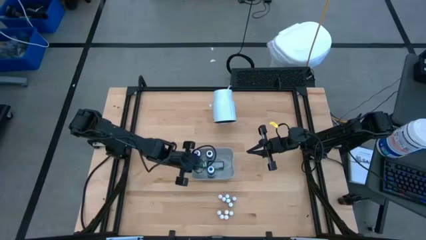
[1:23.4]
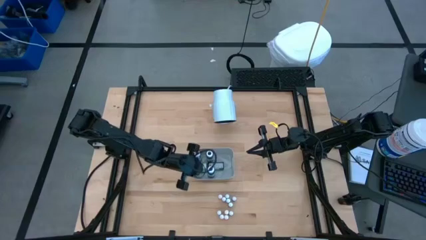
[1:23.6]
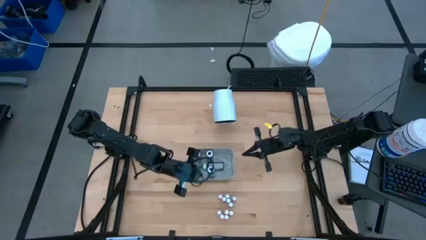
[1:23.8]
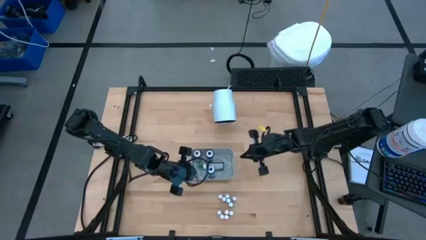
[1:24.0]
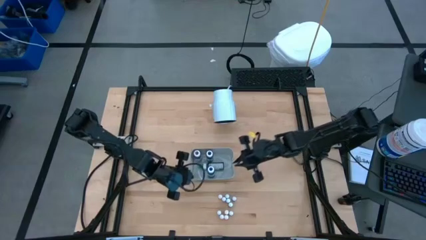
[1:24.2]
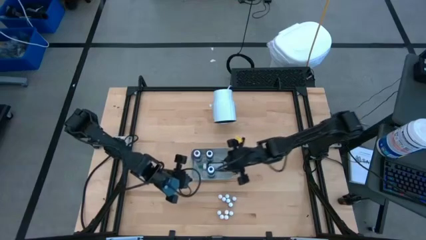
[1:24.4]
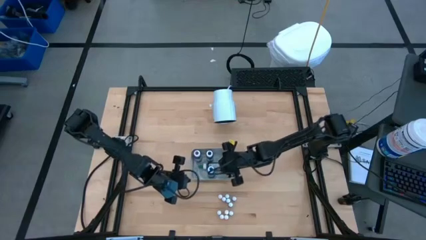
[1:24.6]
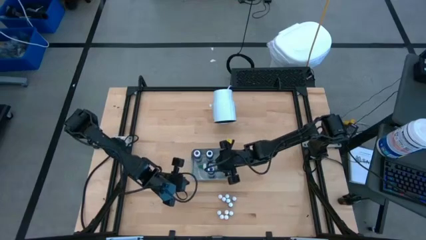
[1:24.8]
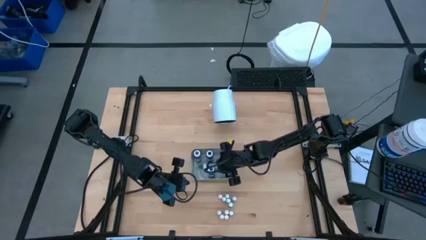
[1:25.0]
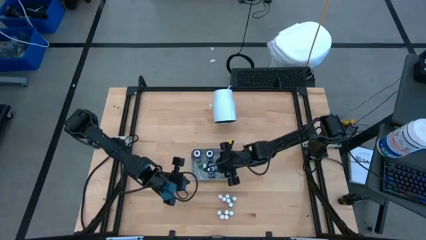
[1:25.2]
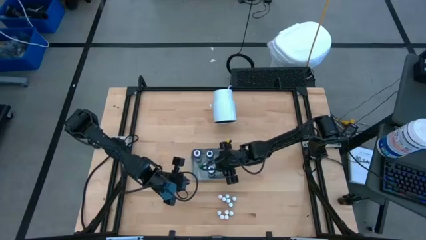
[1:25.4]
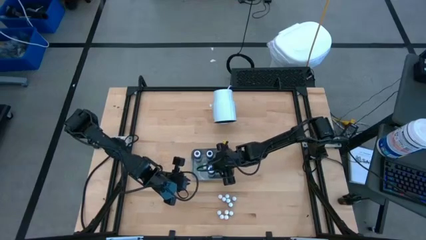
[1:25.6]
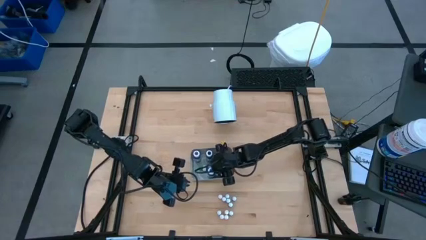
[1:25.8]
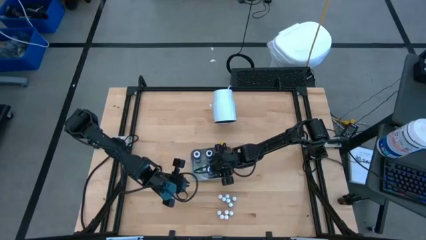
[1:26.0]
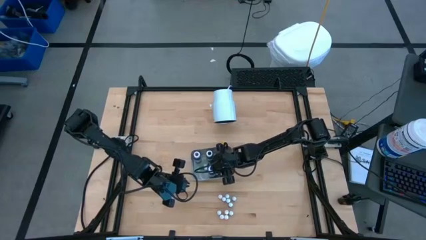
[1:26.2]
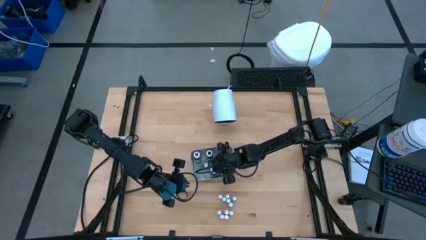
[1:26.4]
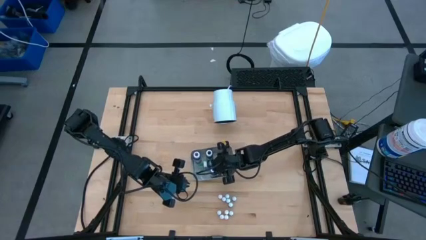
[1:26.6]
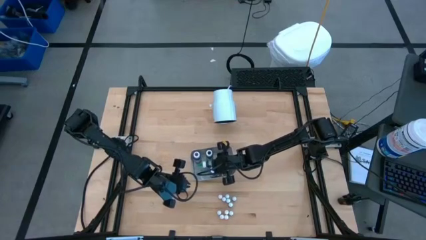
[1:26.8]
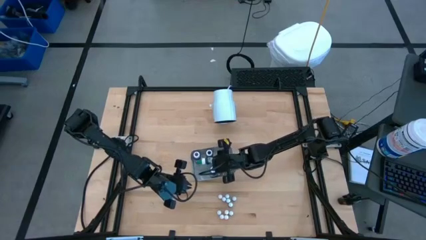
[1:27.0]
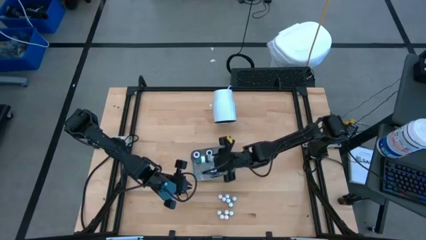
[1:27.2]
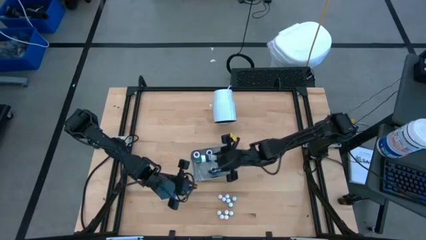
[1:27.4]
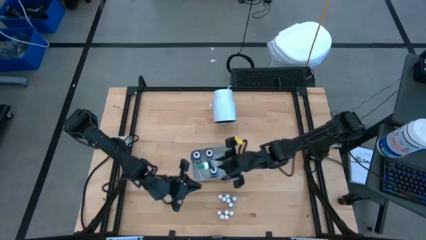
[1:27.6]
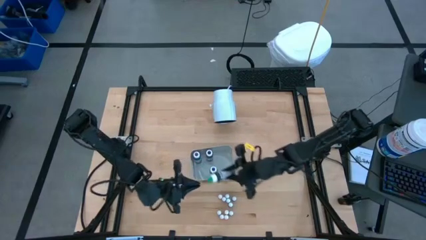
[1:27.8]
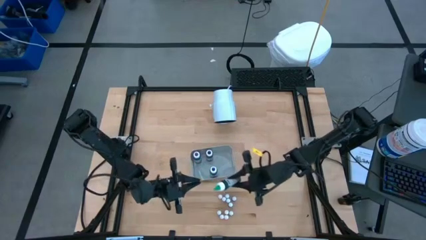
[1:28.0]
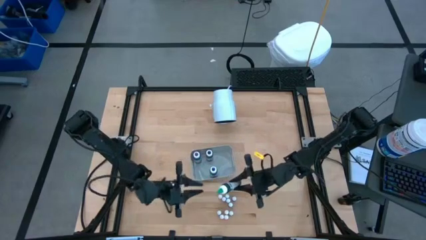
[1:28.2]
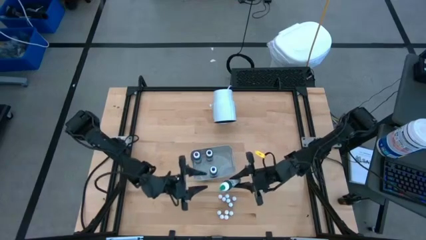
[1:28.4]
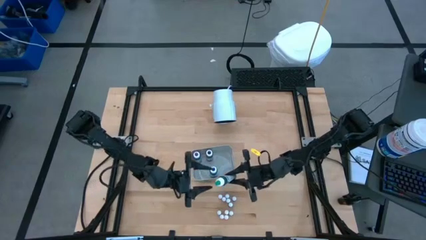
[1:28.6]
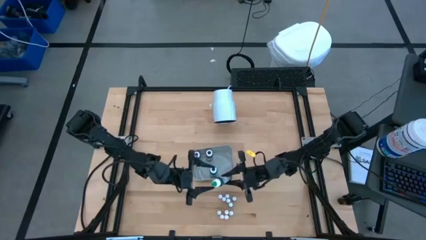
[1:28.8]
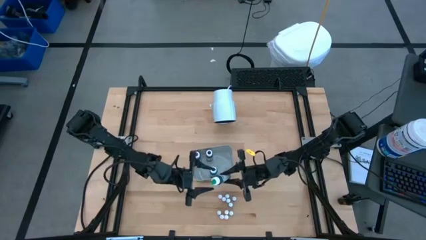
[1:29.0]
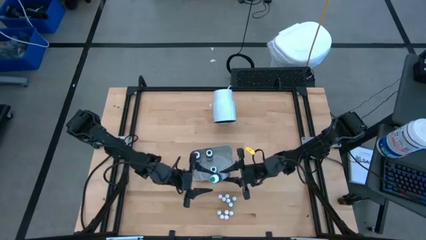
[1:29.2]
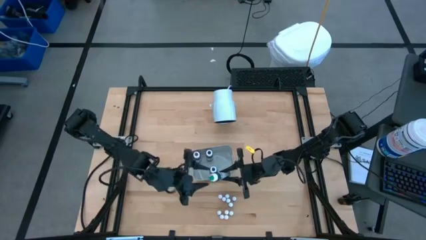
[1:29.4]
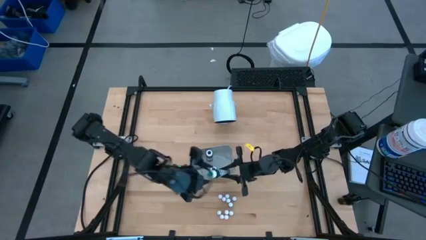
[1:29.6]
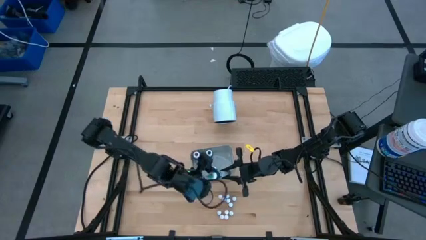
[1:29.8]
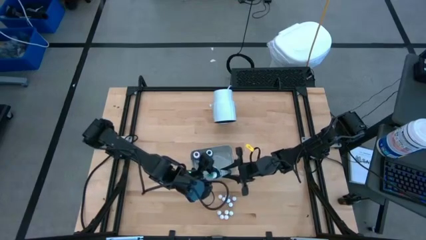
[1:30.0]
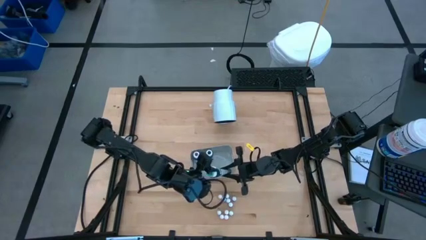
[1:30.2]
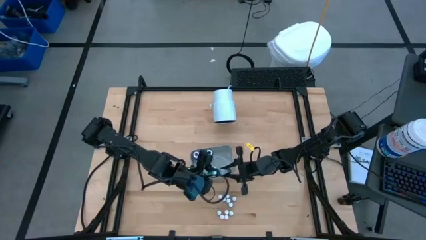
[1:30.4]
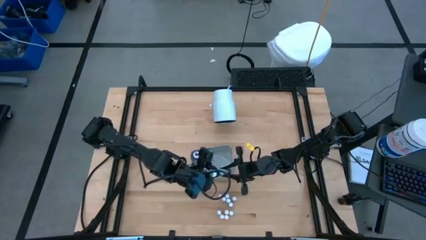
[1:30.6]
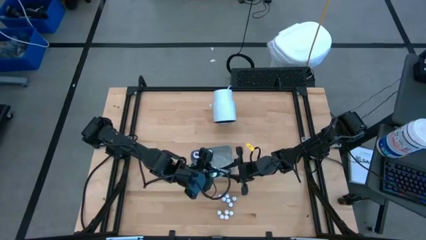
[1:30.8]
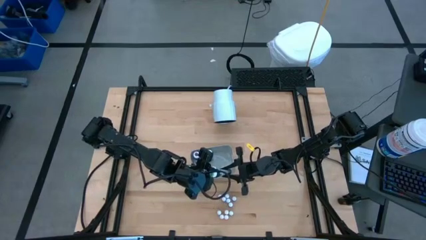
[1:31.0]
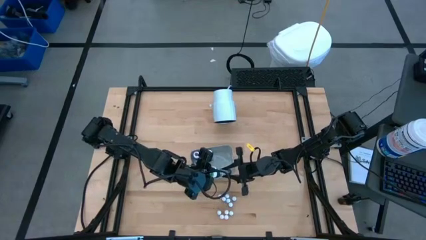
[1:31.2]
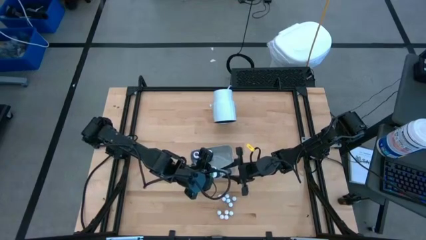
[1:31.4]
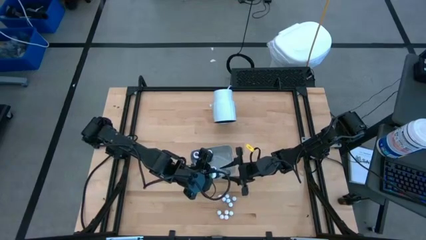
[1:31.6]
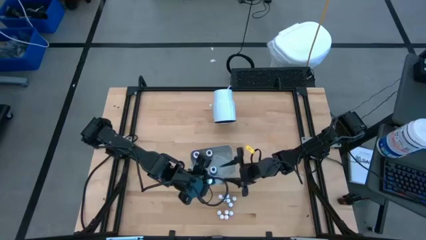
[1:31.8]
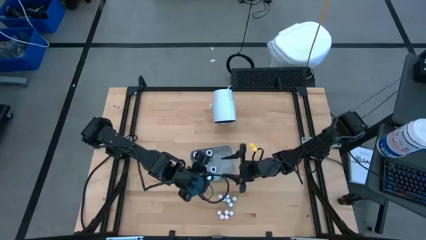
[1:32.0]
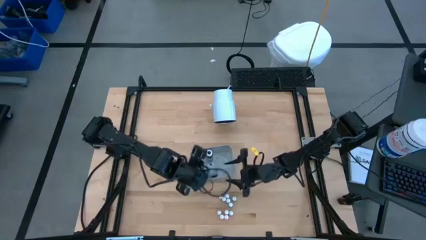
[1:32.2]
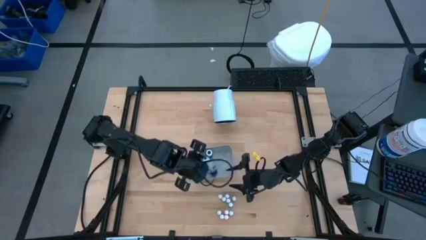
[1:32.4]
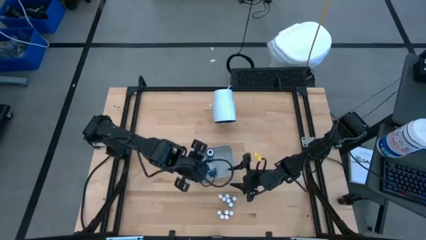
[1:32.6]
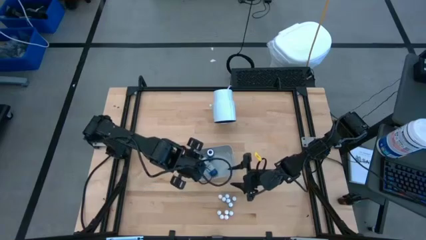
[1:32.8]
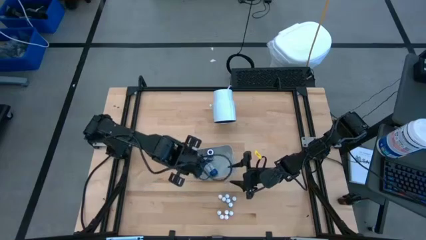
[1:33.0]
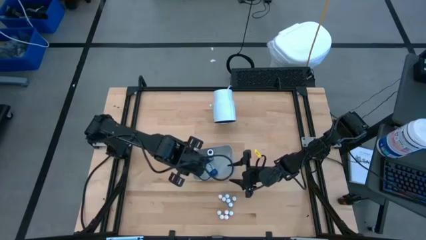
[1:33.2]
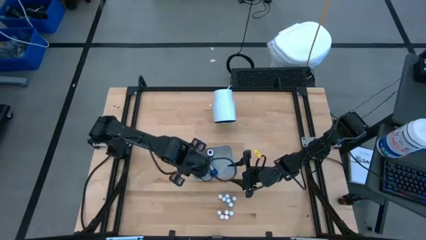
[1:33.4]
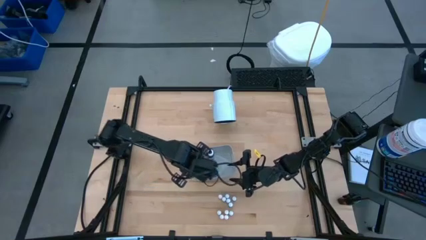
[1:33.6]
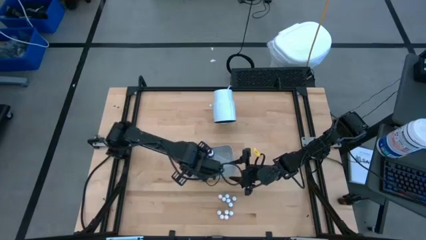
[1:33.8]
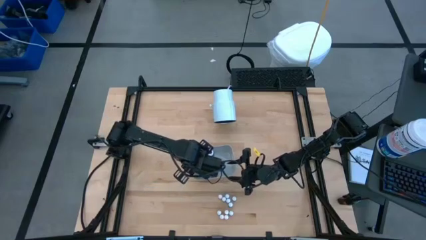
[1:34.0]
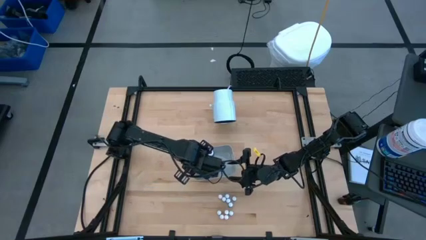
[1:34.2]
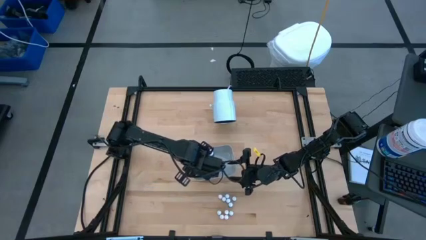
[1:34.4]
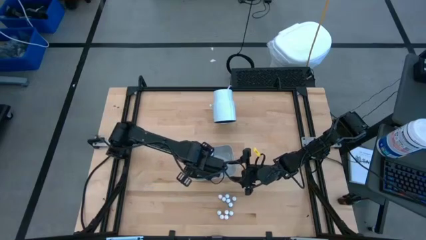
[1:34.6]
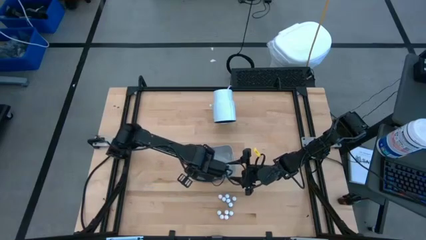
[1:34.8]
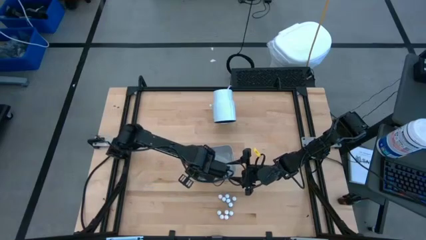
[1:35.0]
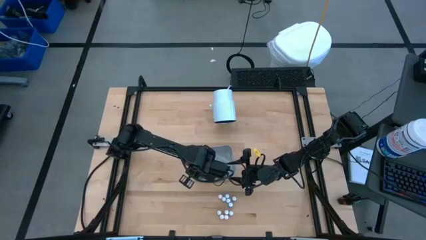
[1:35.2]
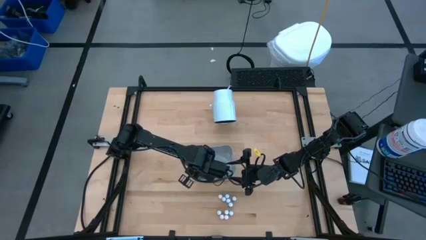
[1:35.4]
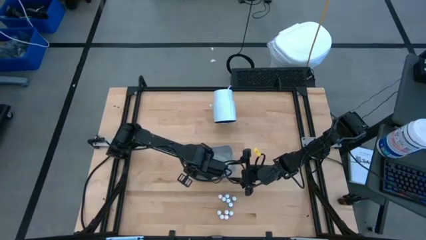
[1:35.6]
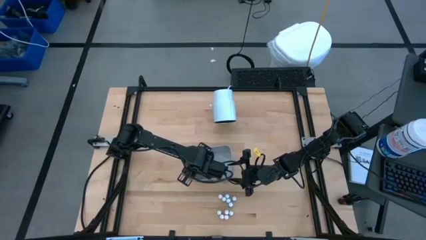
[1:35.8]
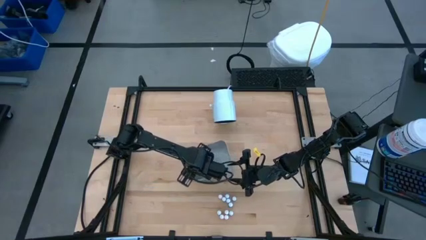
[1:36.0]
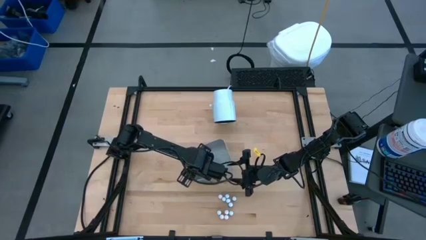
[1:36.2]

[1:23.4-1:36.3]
Task: Pick & Place food coloring
Adjust the large green food coloring bottle on the gray bin

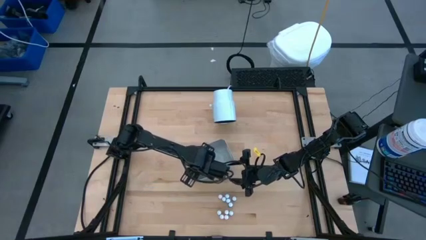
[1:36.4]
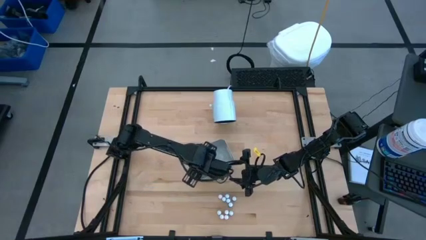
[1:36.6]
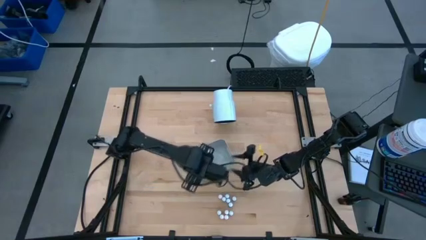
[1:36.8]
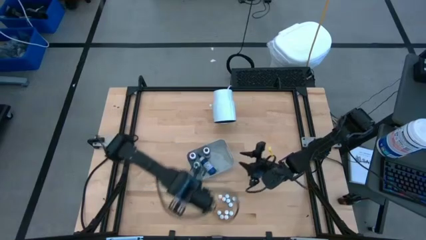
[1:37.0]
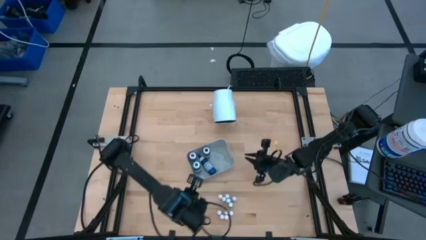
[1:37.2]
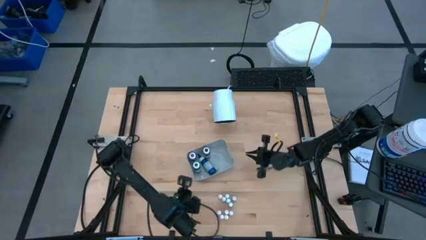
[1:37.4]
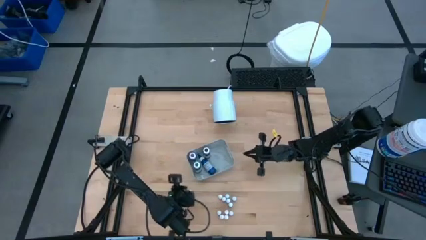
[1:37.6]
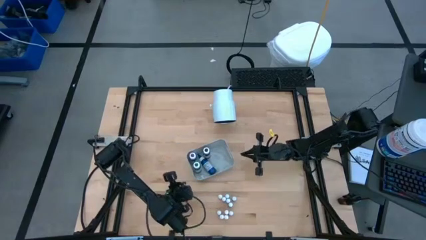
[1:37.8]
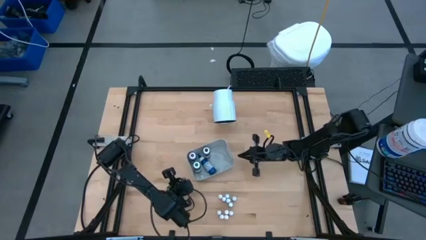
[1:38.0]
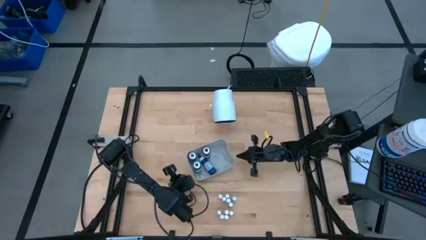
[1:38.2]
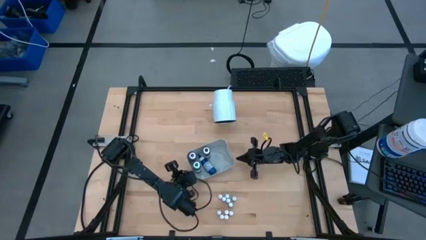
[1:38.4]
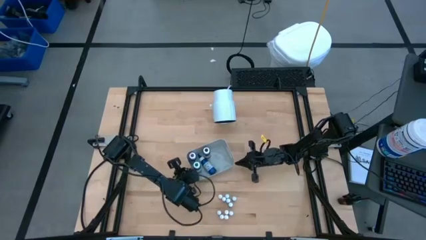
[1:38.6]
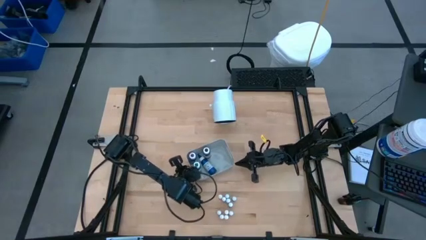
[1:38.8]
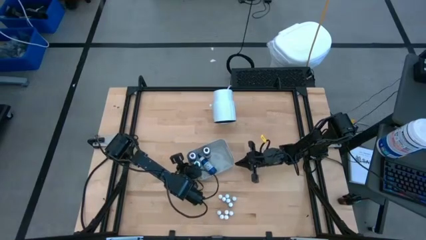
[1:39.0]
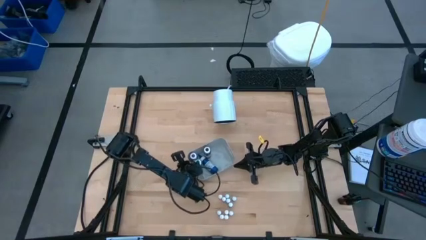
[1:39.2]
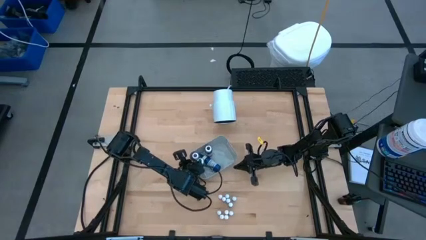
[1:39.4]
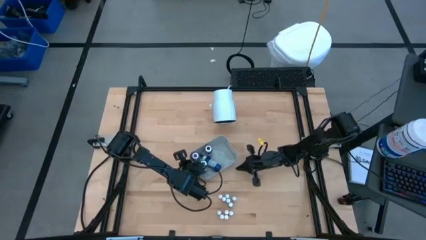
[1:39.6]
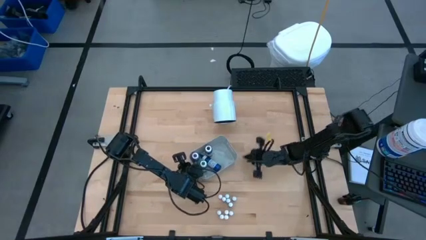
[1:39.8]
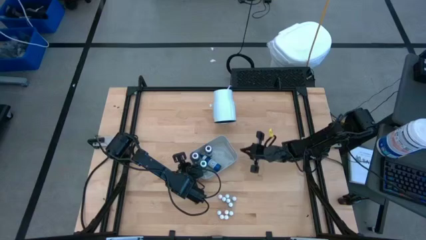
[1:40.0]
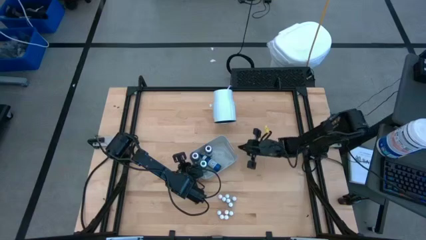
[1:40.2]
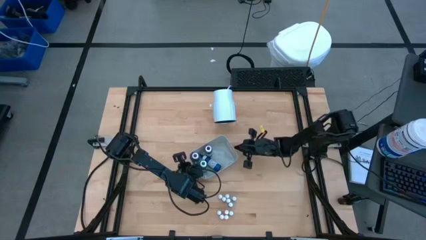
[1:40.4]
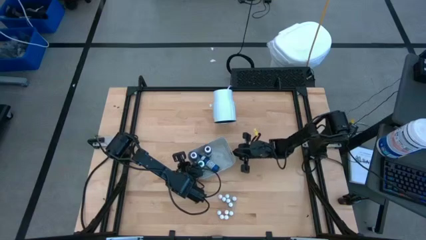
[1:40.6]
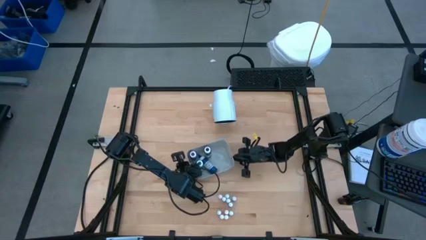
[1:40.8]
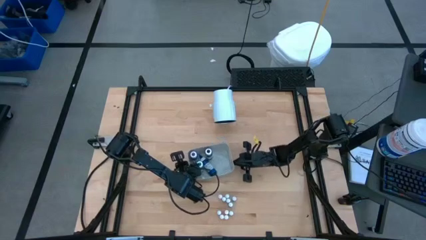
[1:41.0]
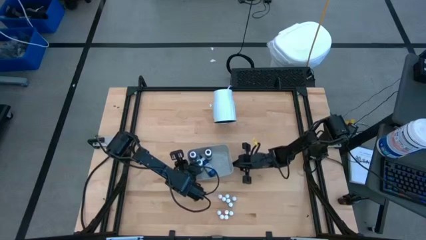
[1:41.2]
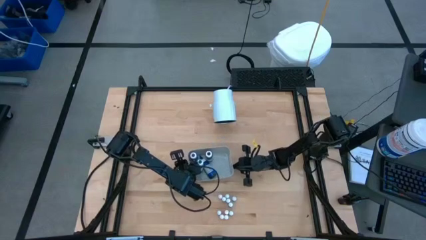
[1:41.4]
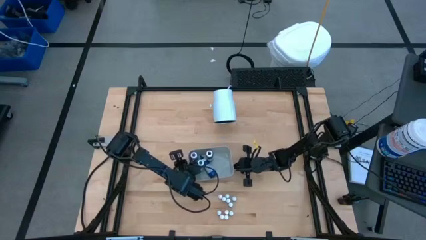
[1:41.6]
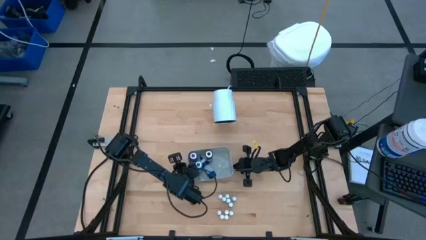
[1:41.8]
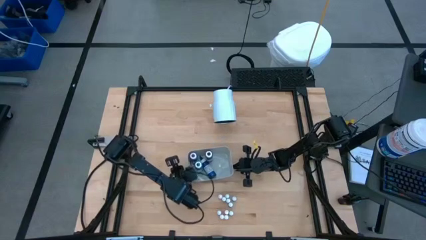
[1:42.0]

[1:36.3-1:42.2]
Adjust the gray bin
